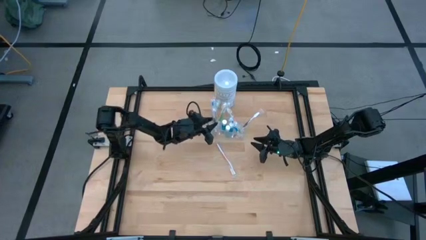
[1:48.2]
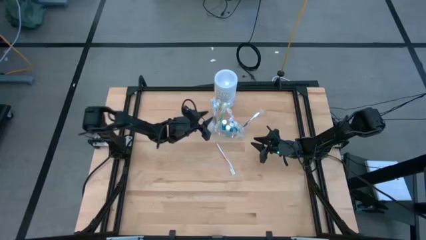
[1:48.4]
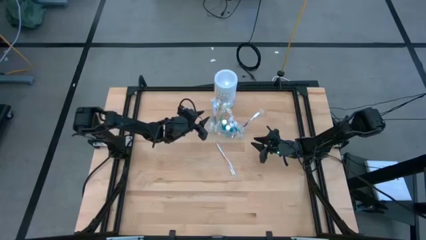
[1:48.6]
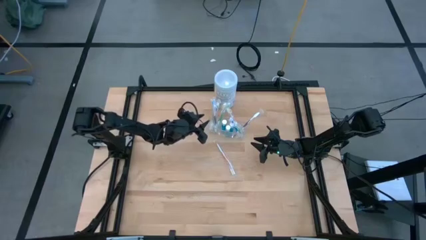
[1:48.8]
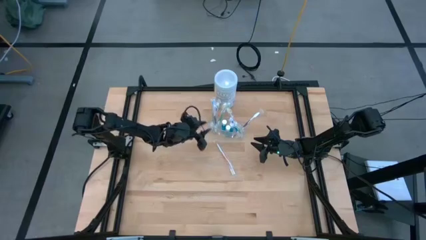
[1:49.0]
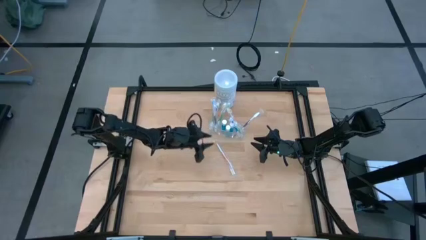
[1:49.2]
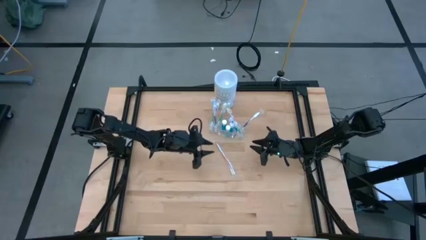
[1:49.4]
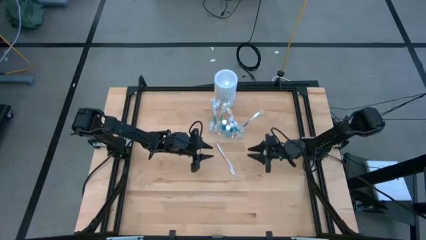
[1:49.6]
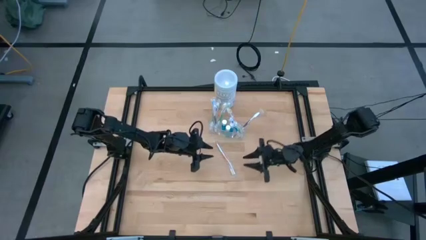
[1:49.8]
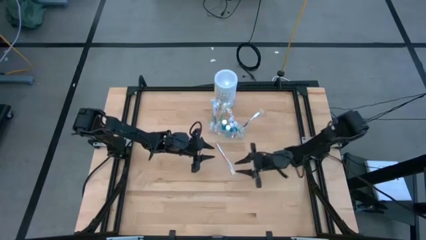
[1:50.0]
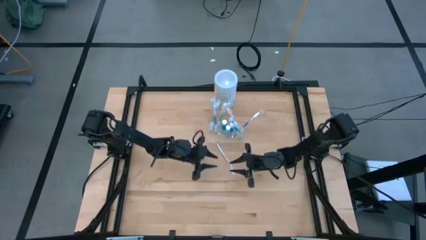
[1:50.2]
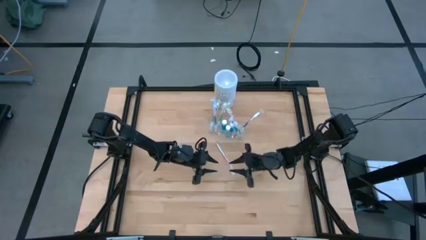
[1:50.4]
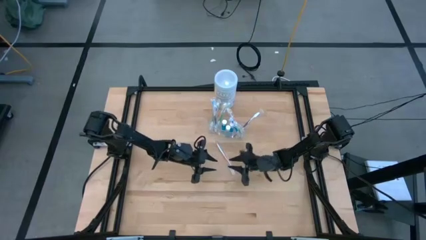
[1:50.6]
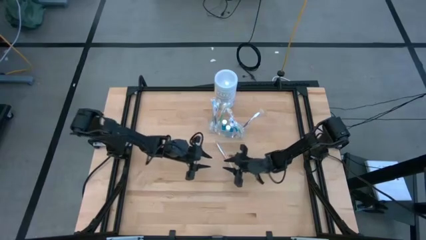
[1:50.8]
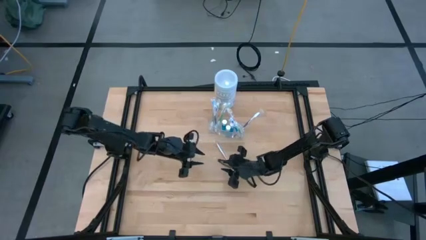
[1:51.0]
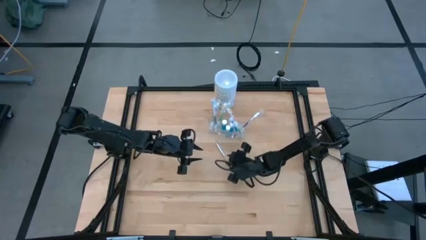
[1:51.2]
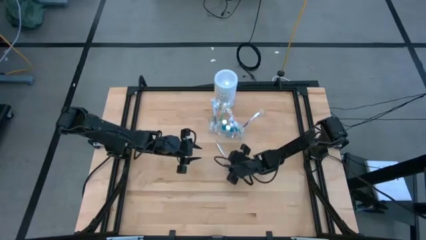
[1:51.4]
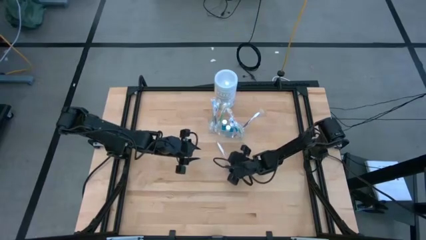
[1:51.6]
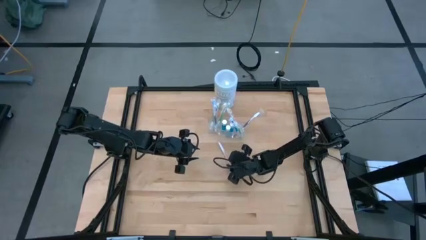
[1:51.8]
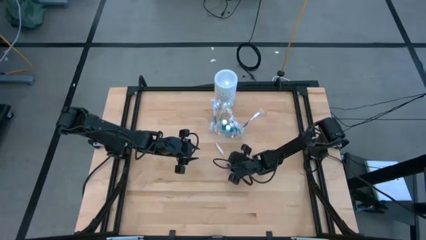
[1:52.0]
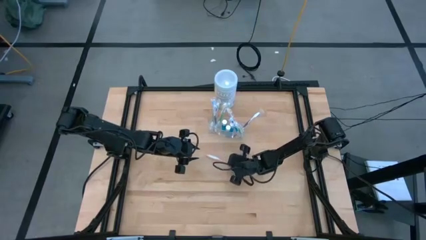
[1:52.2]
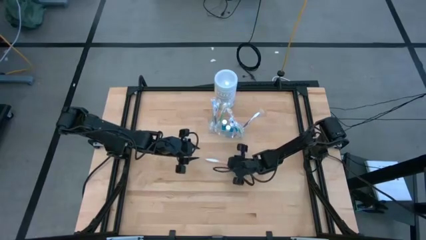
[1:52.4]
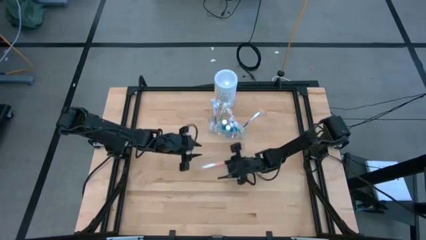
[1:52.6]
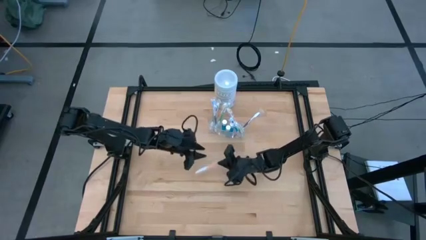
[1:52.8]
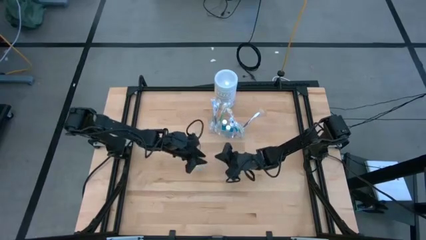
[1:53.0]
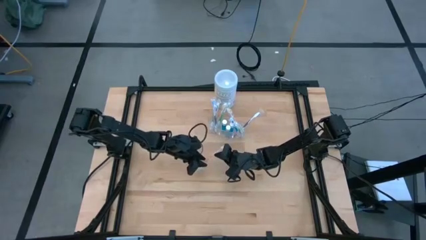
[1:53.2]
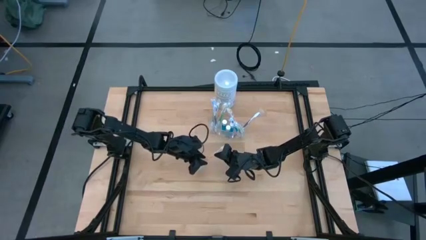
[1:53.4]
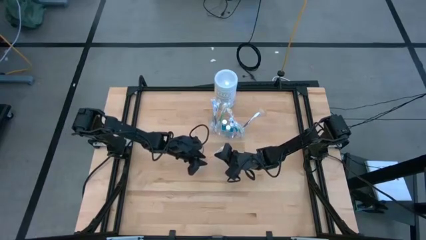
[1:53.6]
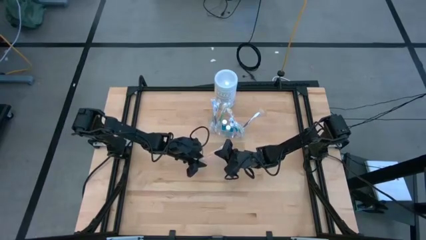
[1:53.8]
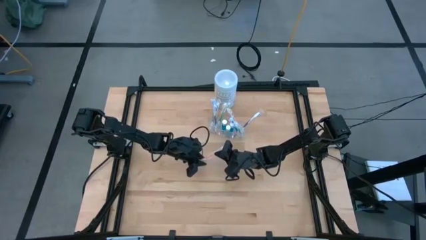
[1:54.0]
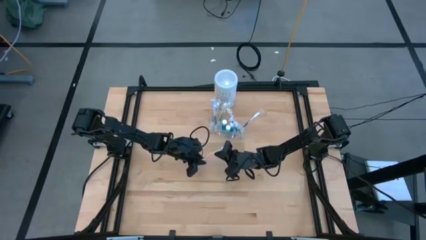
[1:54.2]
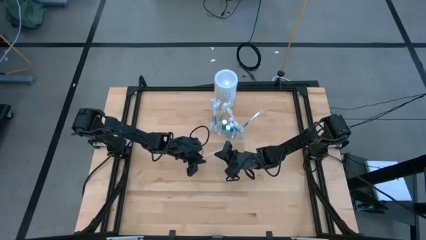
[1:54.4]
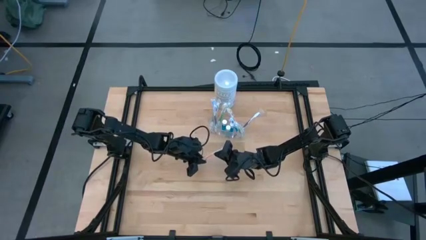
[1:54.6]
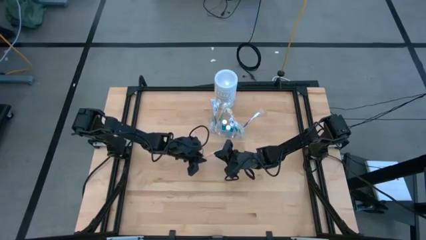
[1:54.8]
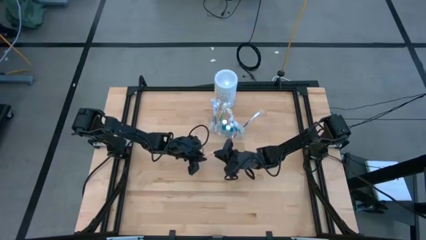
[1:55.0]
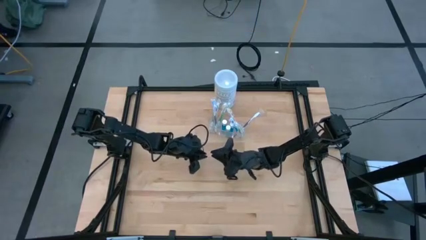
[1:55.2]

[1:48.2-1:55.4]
Task: Pick & Place toothbrushing station
Put the orange toothbrush into the transparent organizer

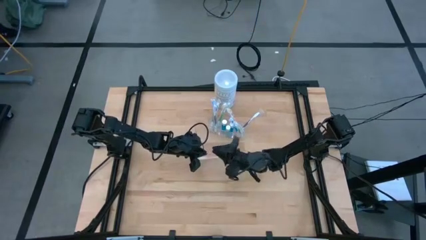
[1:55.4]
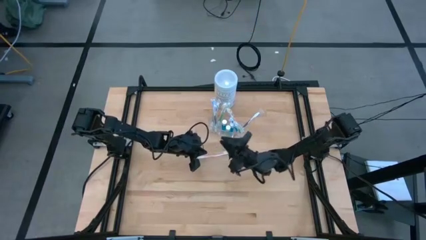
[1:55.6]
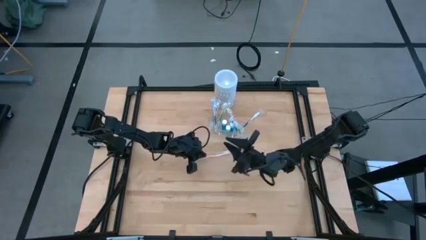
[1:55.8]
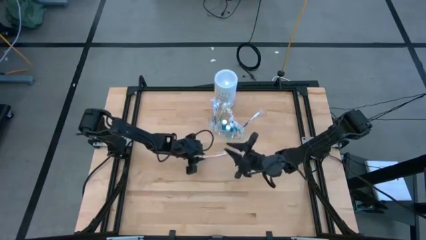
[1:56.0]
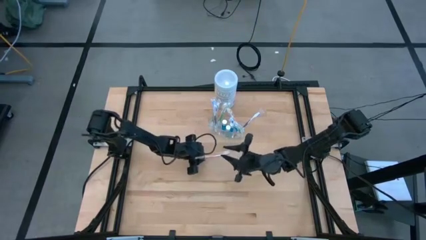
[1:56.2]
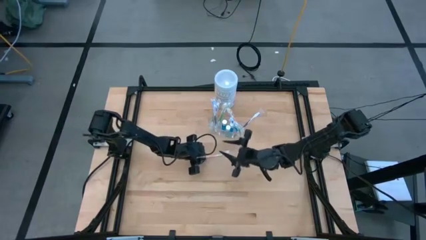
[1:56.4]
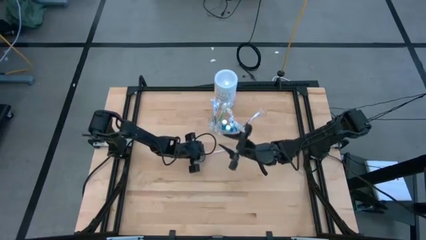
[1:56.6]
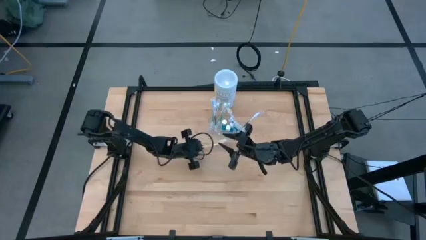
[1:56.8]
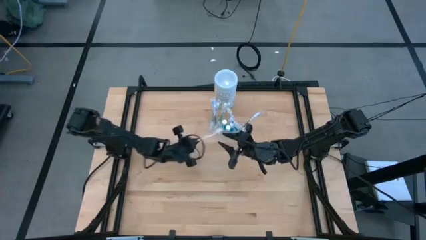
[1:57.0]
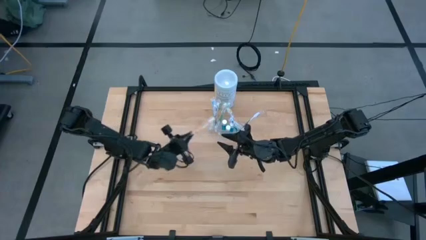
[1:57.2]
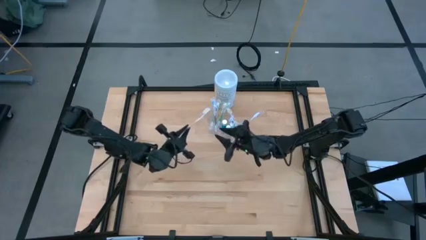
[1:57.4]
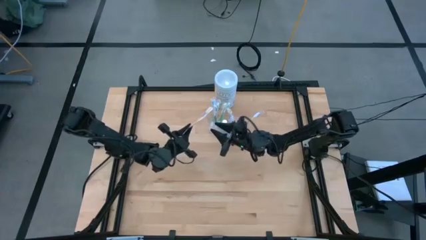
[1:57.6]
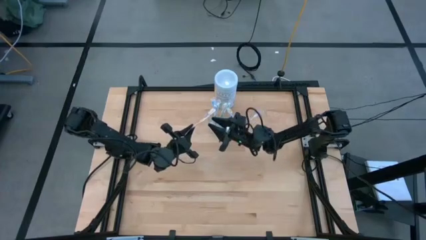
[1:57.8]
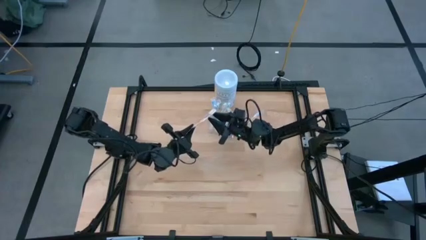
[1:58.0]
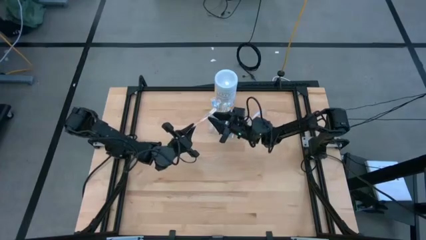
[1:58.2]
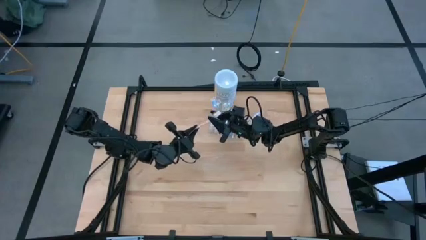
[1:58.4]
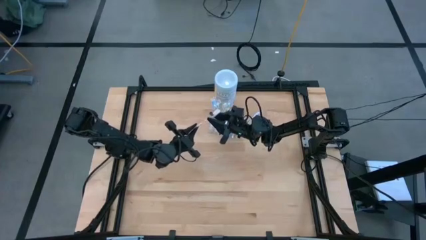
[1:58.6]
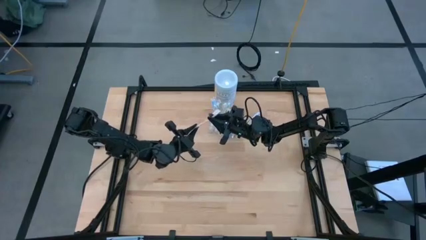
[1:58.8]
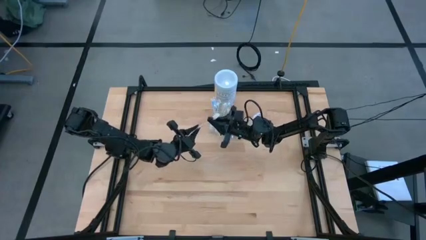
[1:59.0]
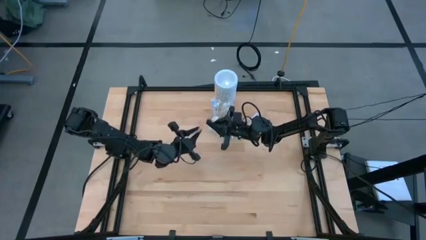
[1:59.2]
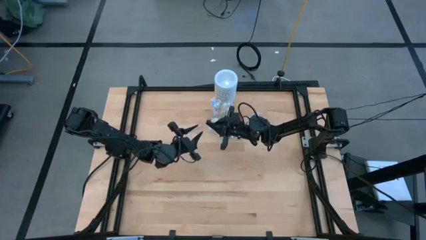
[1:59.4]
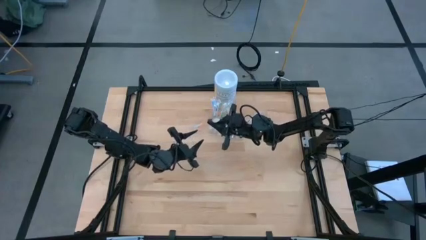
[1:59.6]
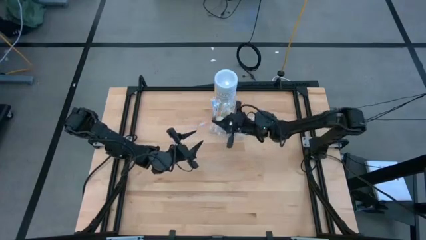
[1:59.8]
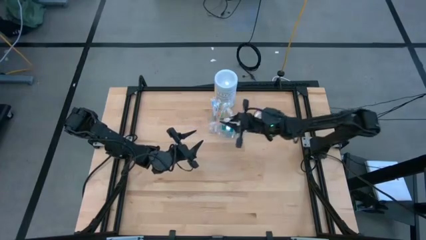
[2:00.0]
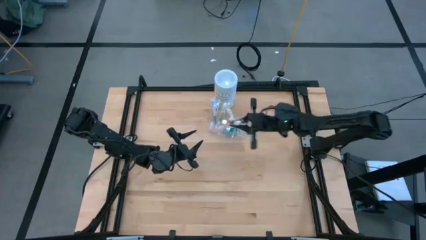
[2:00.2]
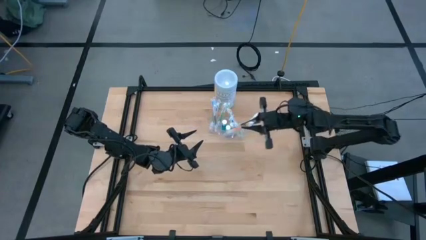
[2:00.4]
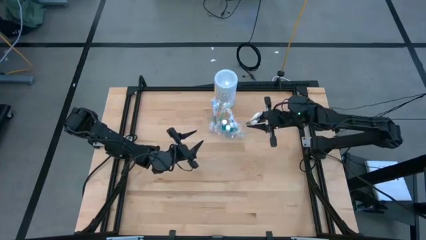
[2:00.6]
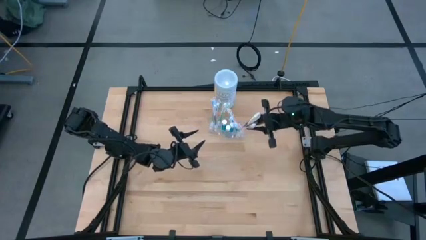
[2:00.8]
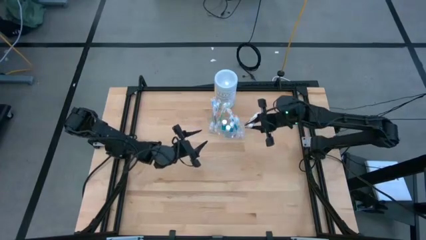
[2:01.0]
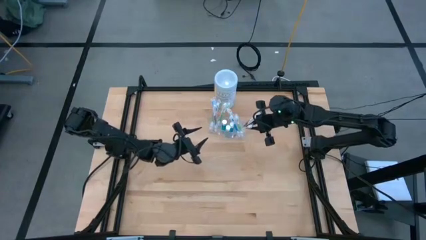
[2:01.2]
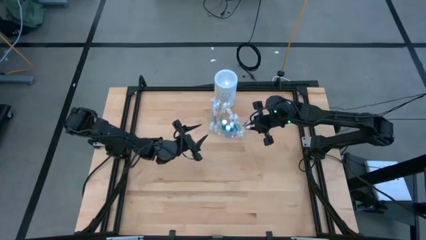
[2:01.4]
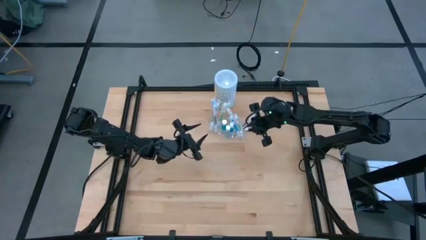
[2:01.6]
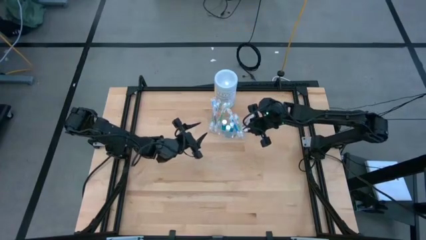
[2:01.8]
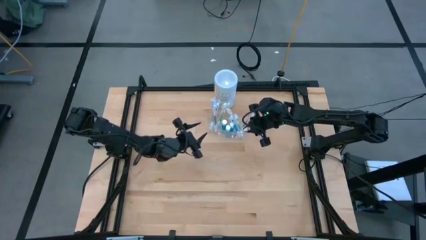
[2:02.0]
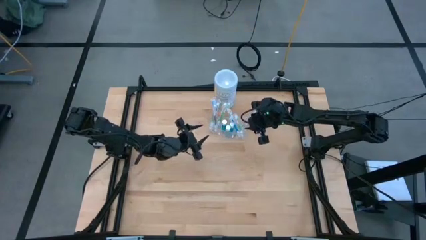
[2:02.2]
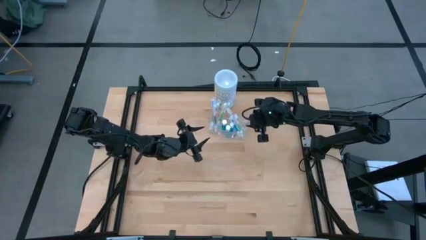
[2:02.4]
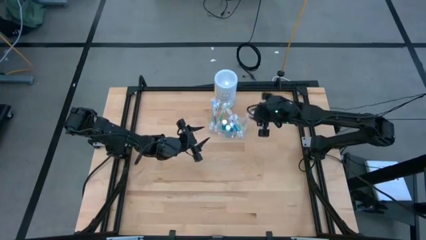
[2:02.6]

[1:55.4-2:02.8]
Put the orange toothbrush into the transparent organizer

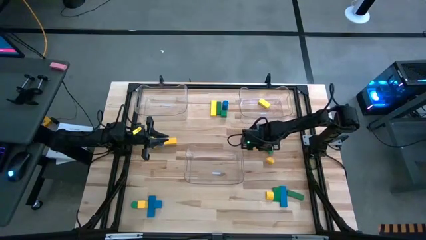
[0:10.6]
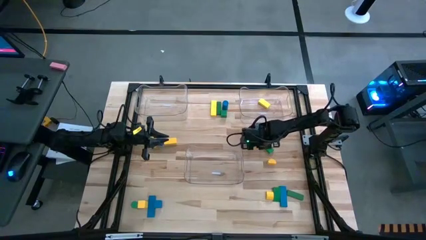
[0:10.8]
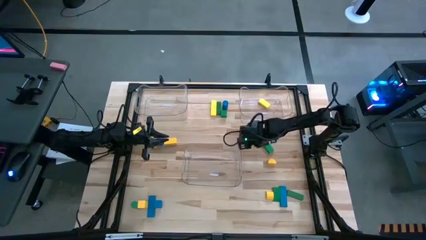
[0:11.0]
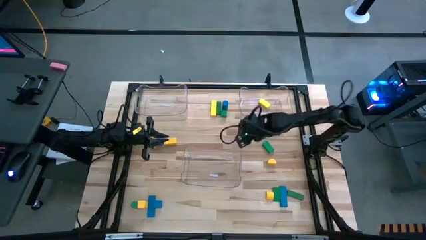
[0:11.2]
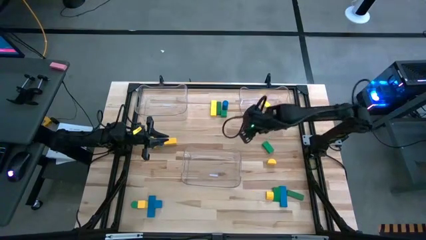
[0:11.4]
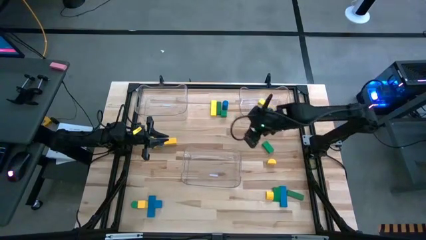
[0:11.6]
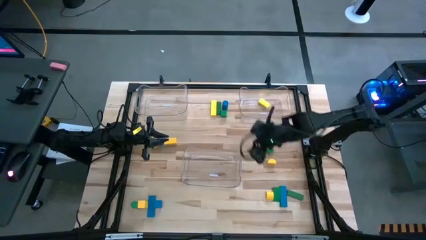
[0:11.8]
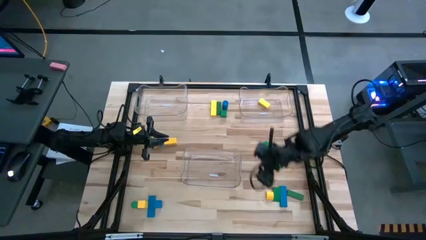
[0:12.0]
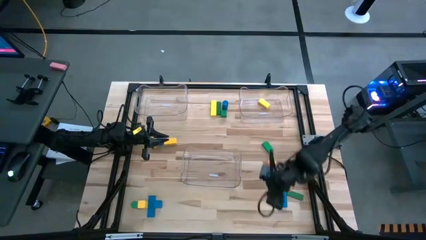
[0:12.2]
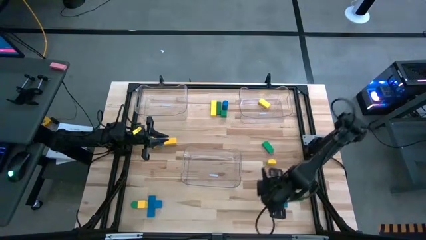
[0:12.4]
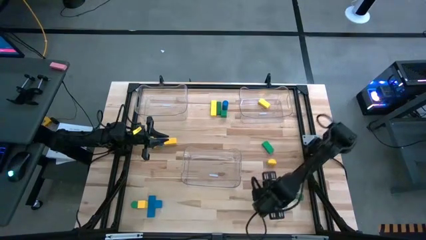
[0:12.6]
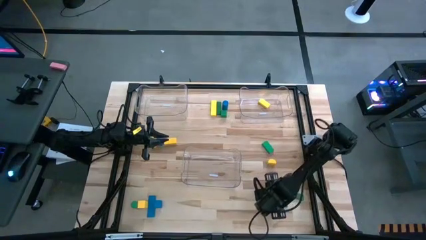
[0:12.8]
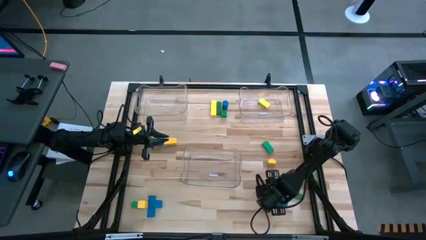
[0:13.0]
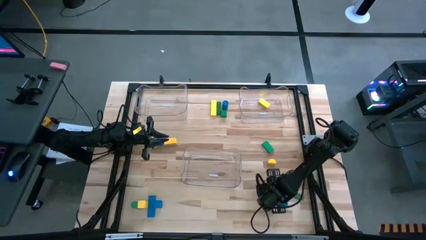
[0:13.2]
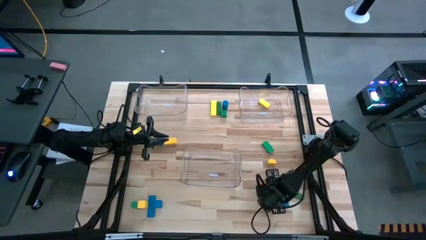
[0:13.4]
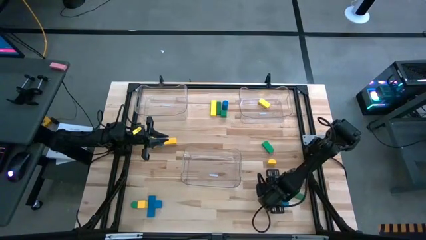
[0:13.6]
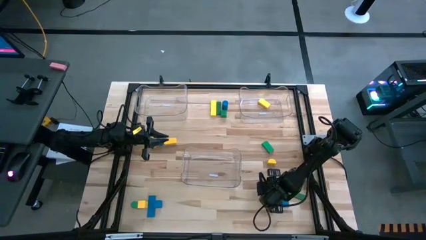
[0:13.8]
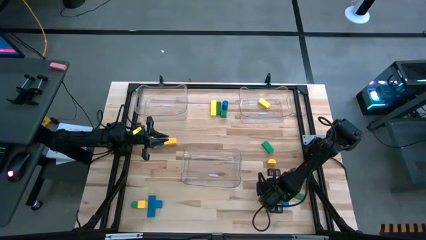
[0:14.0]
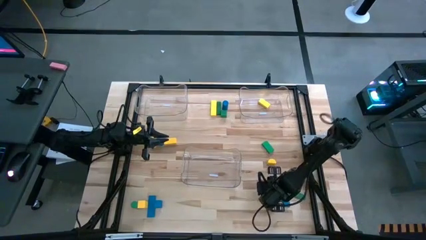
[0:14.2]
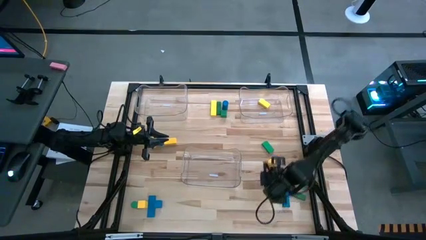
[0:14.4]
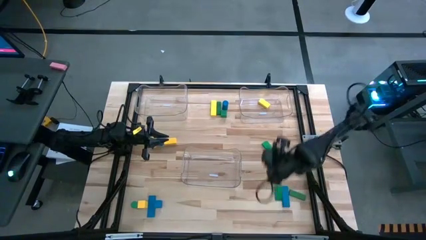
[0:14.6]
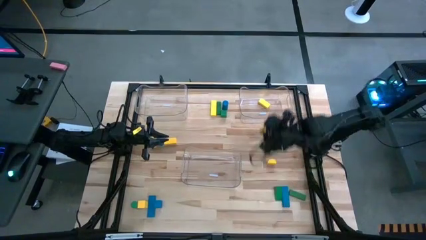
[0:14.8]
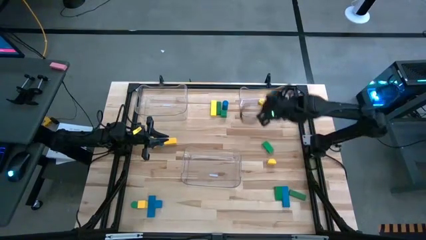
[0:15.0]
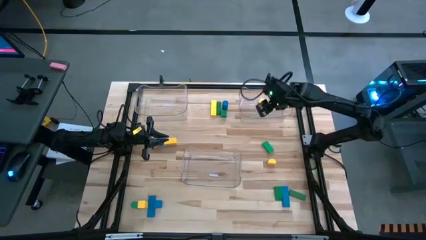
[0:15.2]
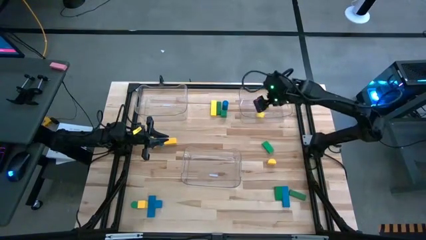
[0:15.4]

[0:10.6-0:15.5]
Task: Sort blocks
Put the yellow block into the right transparent bin
